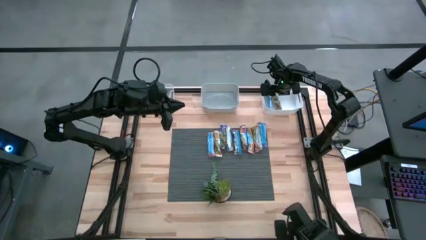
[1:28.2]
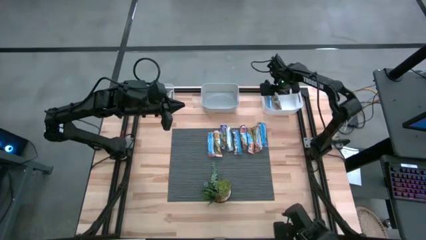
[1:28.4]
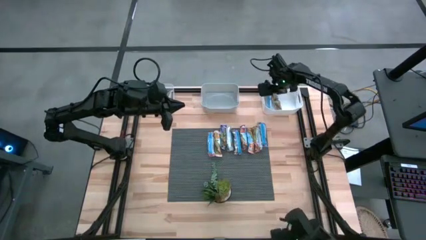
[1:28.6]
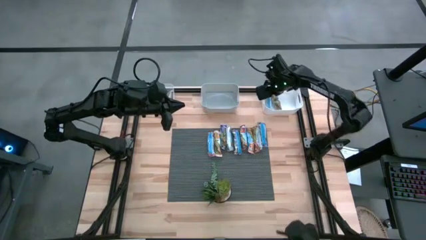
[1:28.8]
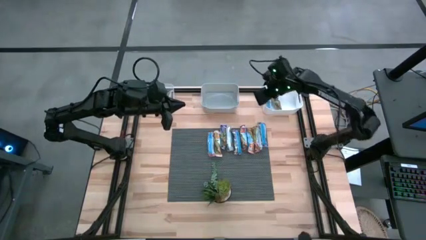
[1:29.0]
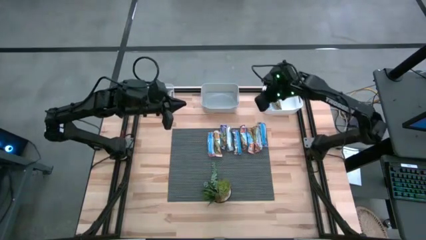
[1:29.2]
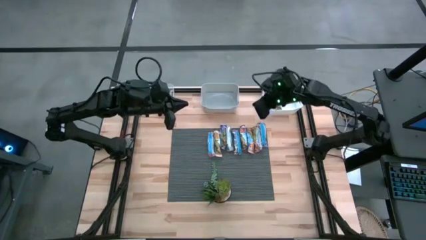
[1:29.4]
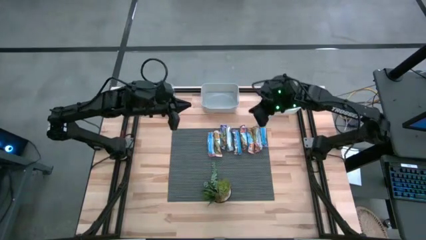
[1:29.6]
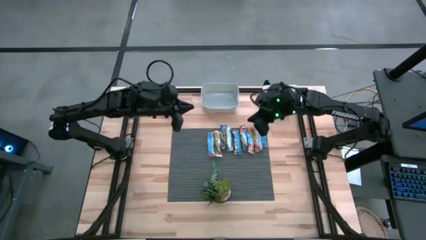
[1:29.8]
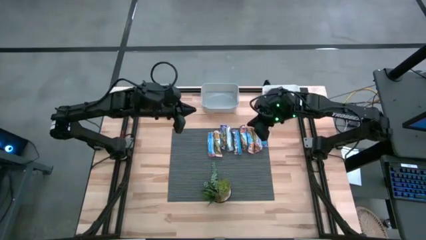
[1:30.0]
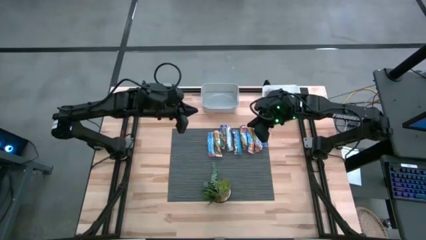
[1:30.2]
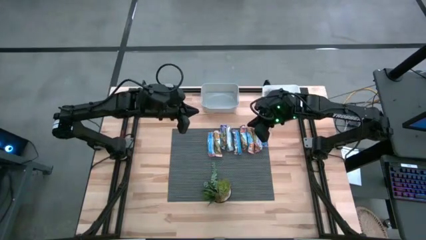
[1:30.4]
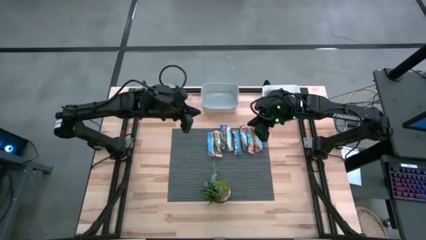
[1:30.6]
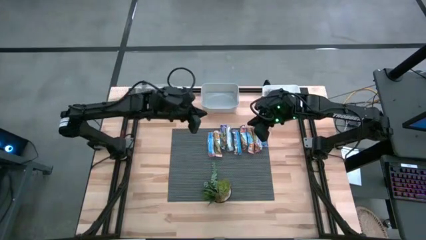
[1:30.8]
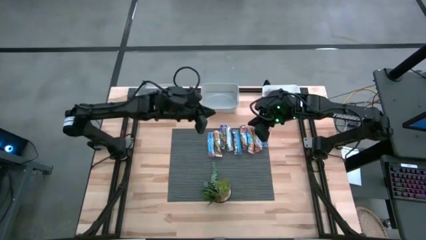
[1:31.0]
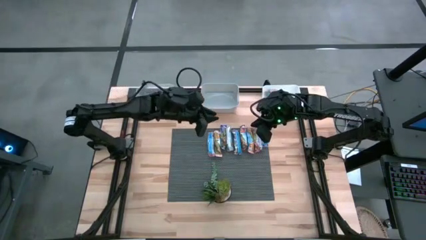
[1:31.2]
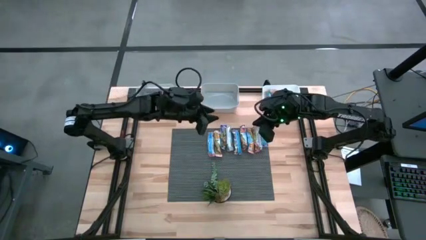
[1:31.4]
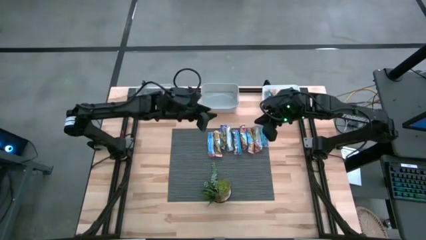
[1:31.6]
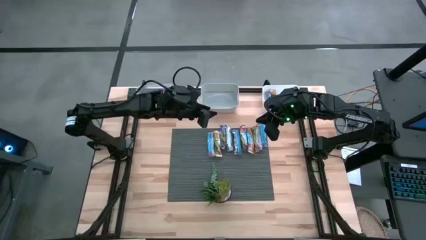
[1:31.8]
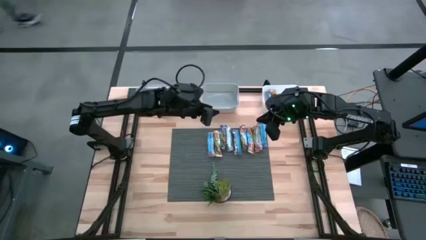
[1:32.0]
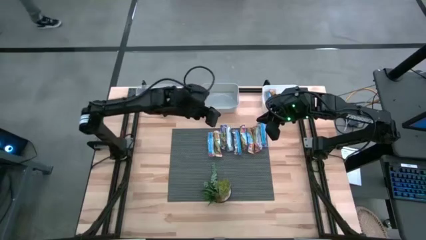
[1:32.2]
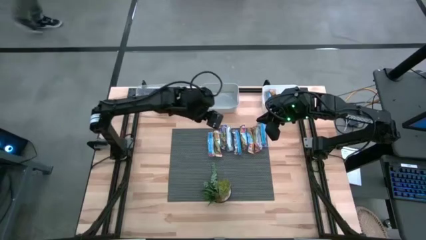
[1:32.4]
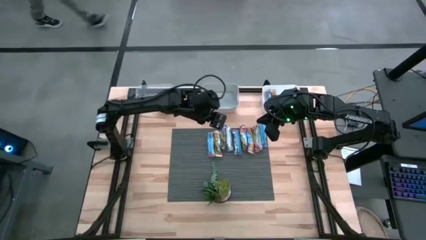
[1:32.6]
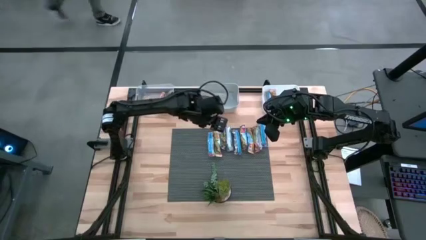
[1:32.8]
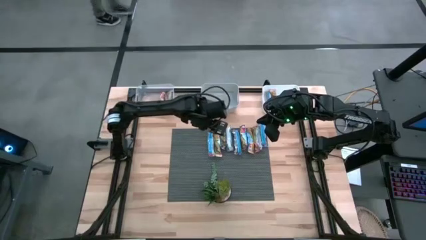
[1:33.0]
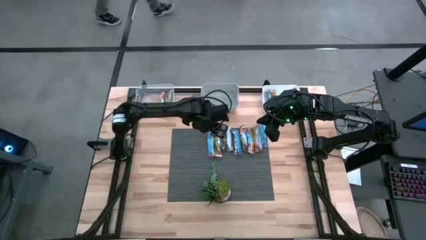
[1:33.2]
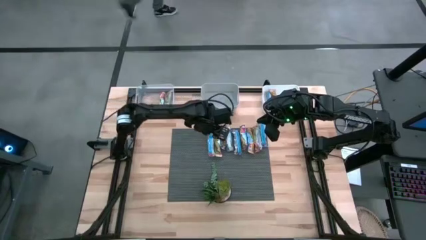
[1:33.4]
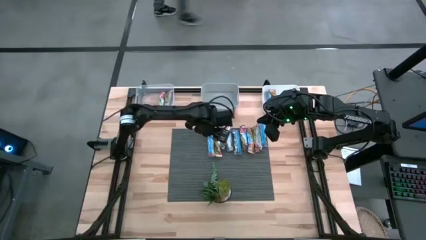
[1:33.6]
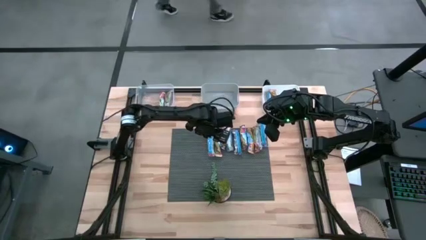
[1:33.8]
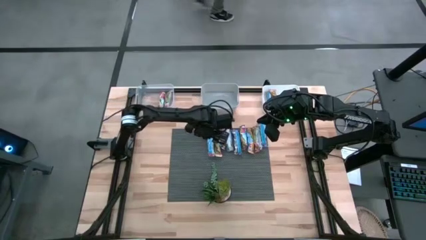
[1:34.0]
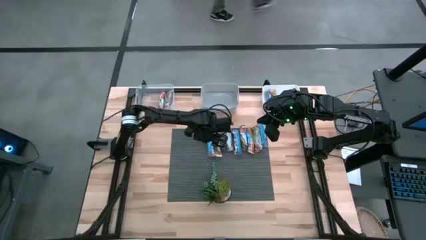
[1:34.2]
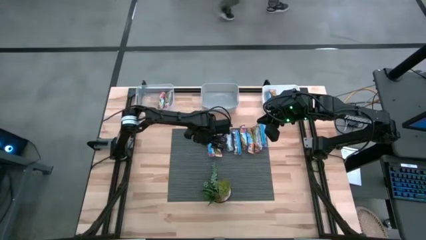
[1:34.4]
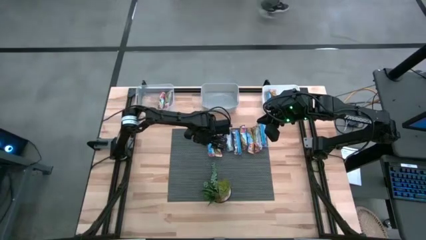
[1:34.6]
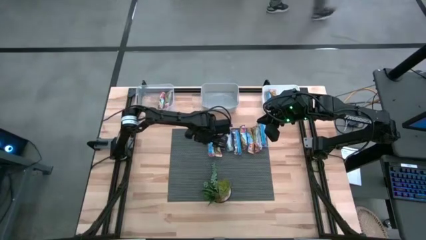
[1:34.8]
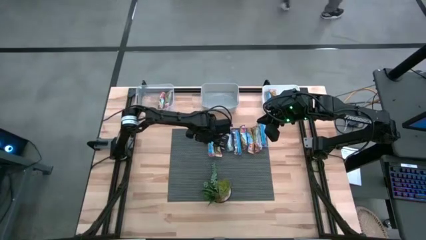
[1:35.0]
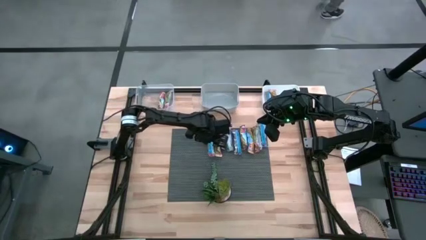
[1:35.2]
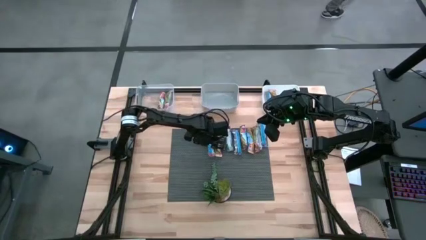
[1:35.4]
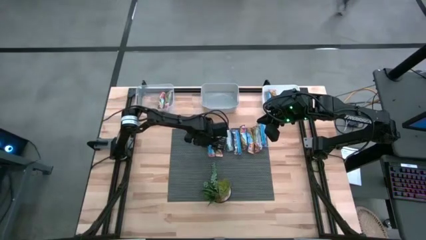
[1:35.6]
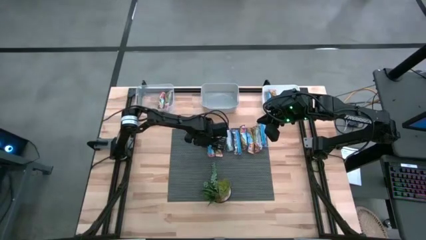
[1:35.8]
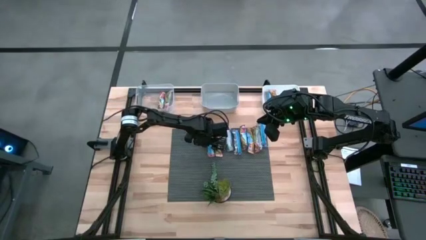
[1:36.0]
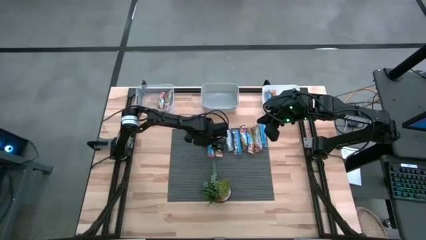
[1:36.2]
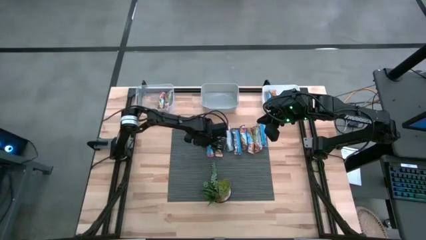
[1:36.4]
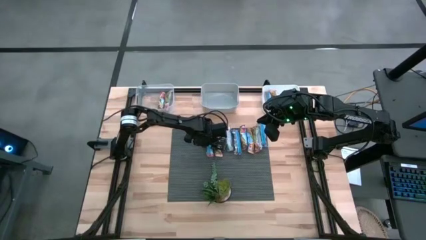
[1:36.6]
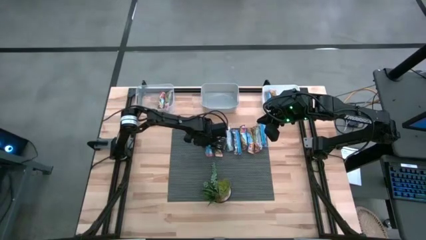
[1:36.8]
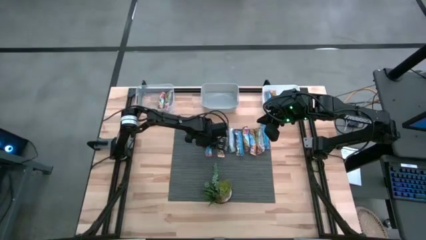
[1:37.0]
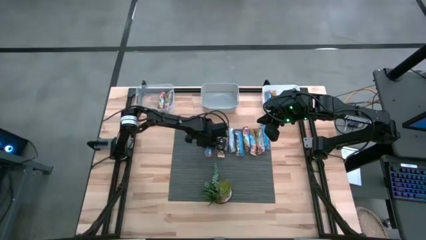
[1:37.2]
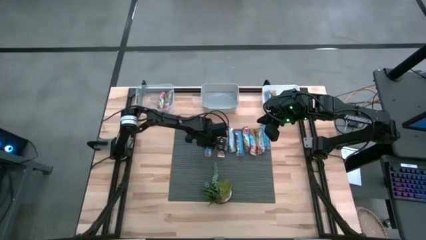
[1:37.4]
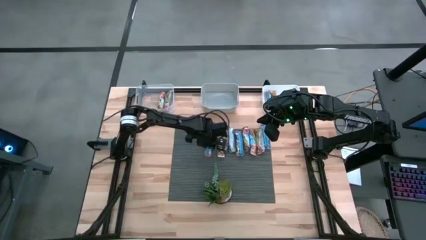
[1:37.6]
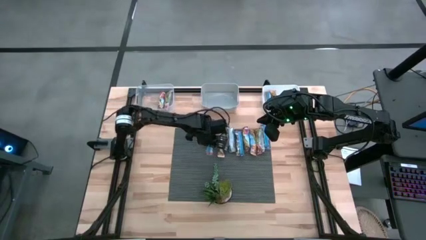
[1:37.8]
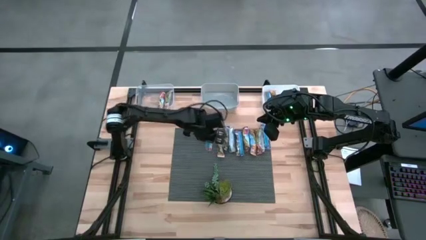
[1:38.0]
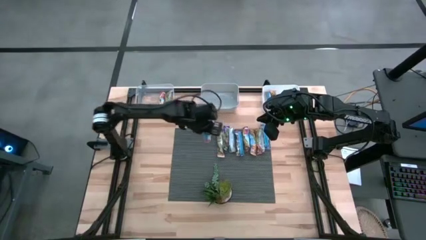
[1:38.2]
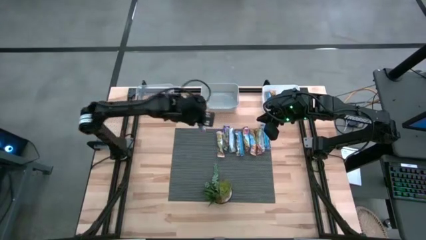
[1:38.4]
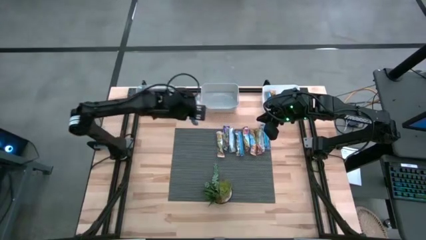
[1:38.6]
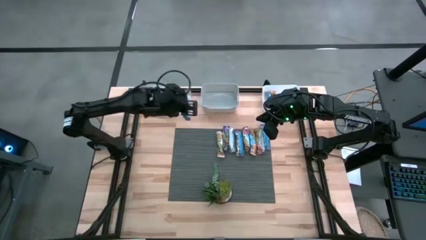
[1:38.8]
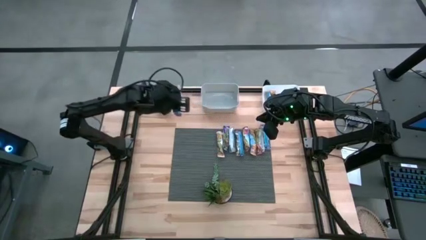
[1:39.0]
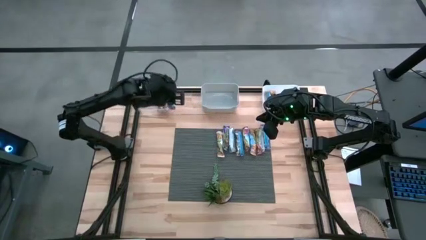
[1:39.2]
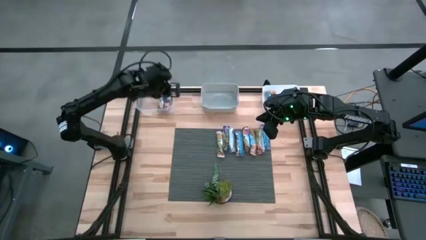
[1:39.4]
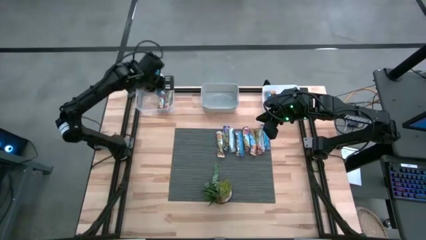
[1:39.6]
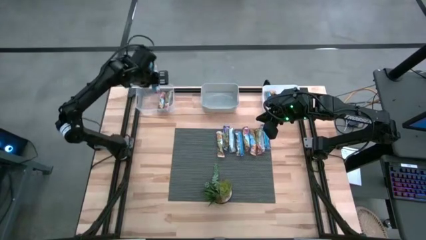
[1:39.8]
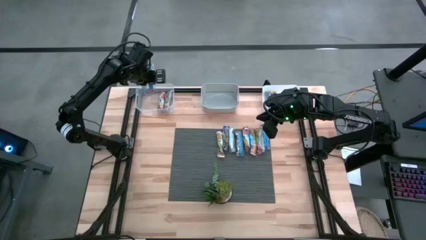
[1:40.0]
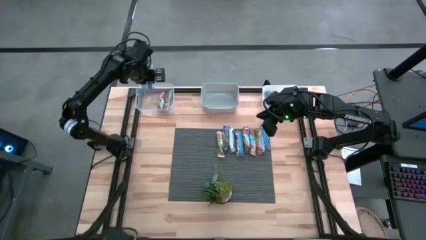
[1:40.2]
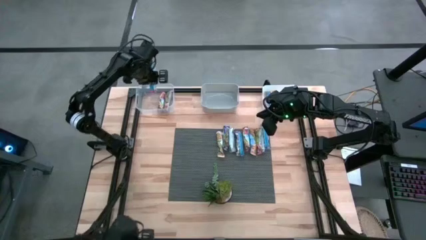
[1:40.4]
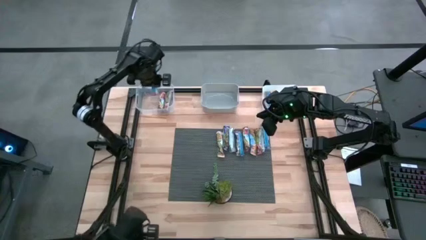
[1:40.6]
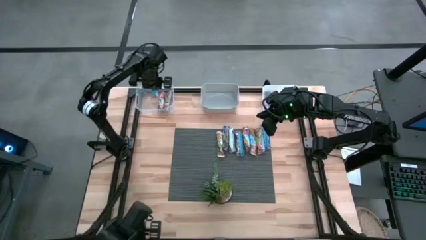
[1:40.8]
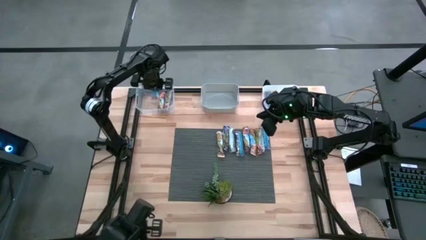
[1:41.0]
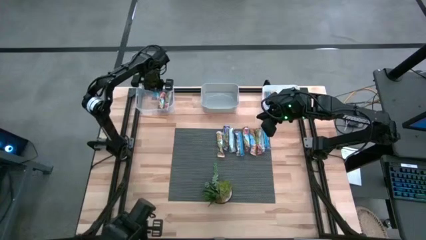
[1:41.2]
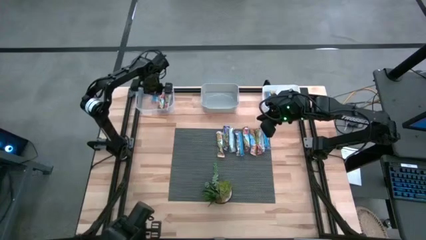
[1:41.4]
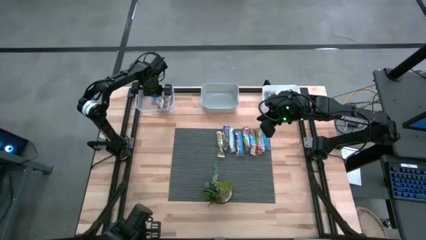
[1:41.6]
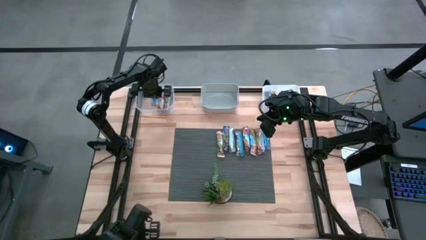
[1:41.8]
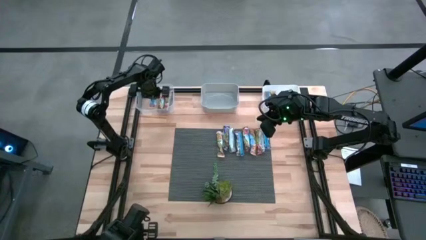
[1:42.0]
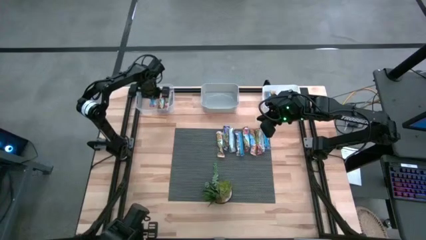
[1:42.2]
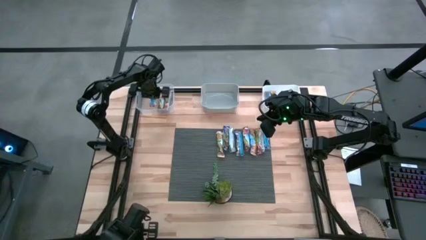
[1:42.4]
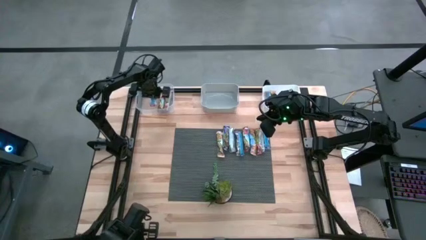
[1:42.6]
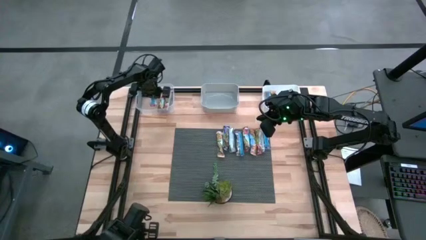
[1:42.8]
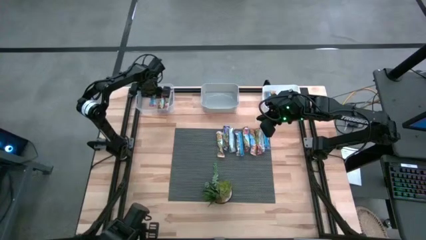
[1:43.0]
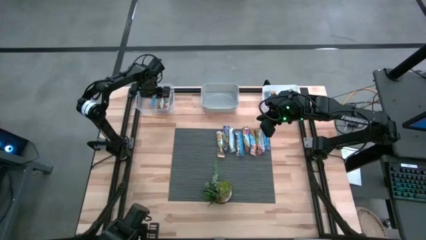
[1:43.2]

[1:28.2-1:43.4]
Task: Pick and place Granola Bars by type
Put the red granola bar into the transparent bin

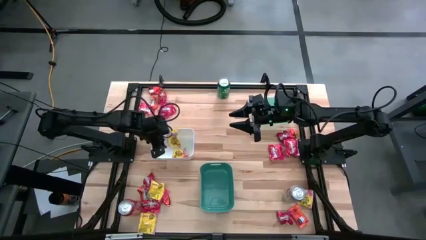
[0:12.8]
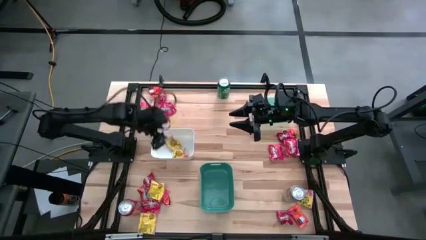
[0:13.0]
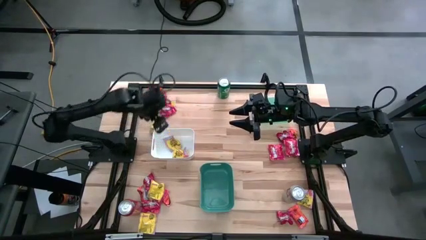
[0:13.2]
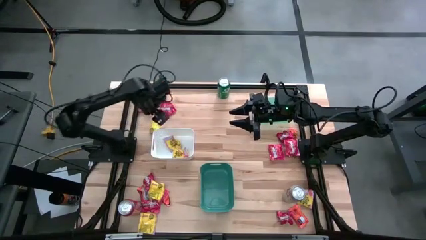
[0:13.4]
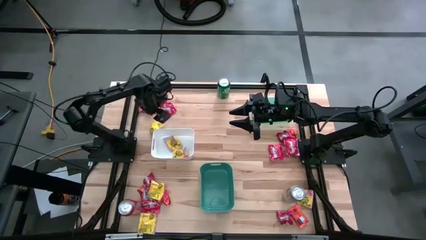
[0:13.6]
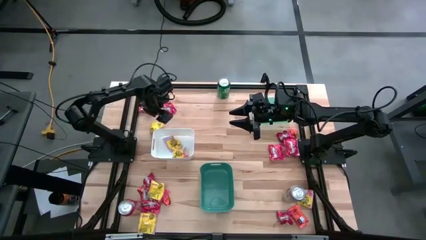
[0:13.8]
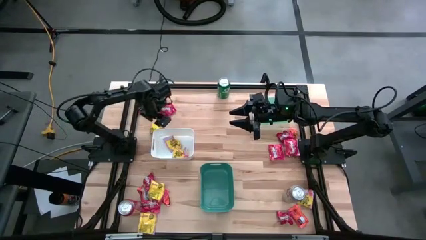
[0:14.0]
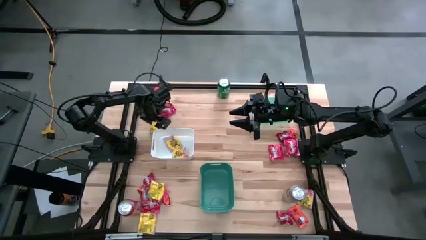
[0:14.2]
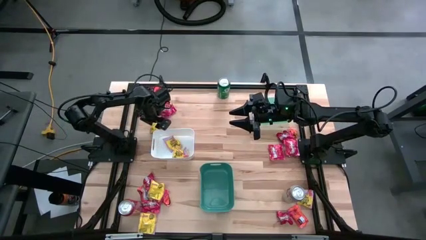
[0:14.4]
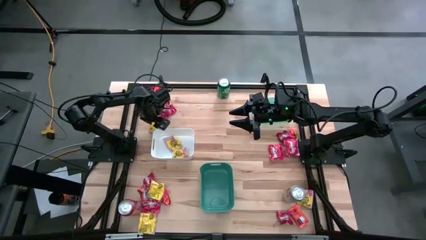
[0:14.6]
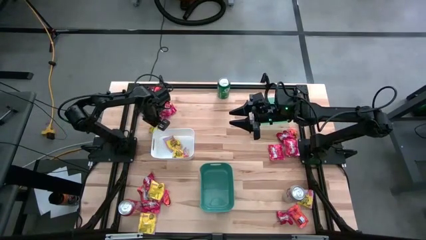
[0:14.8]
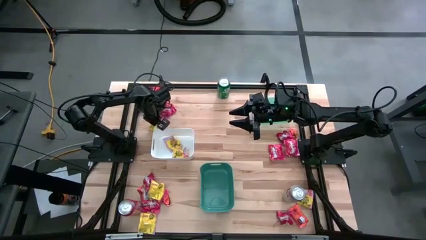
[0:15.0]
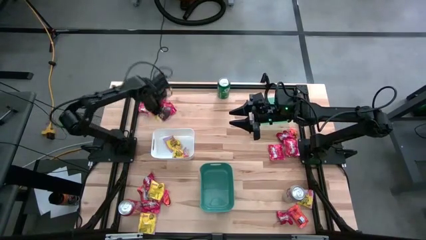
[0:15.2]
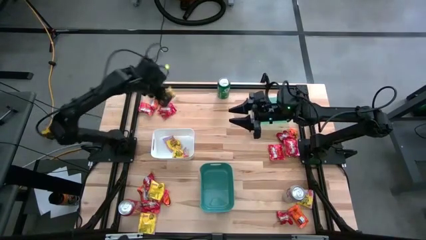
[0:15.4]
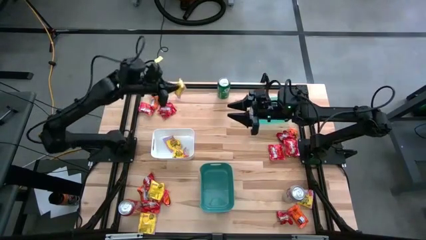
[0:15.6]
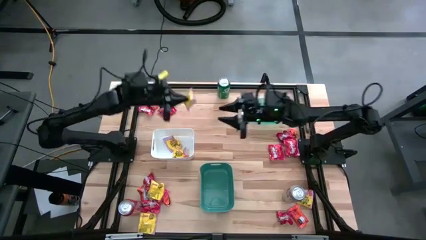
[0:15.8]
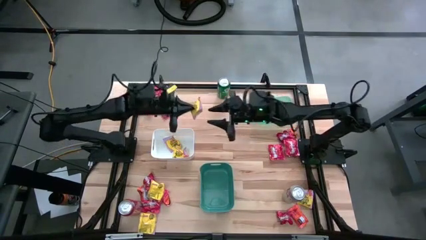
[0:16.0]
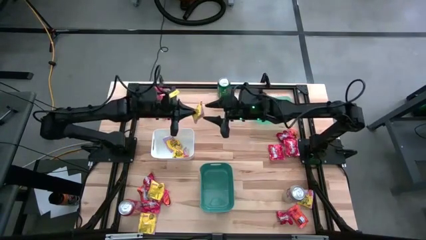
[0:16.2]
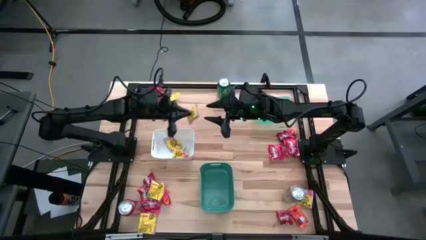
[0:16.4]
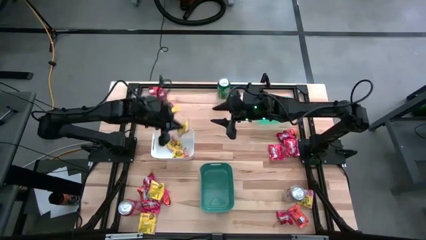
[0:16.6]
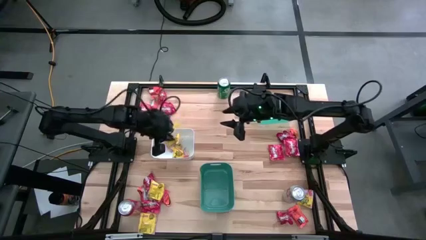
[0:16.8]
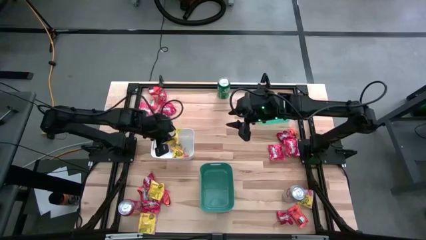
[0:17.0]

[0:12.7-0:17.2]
Task: Sort candy
Put the yellow candy pack into the white bin
